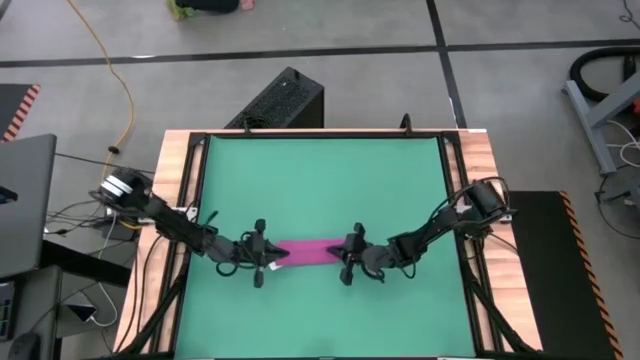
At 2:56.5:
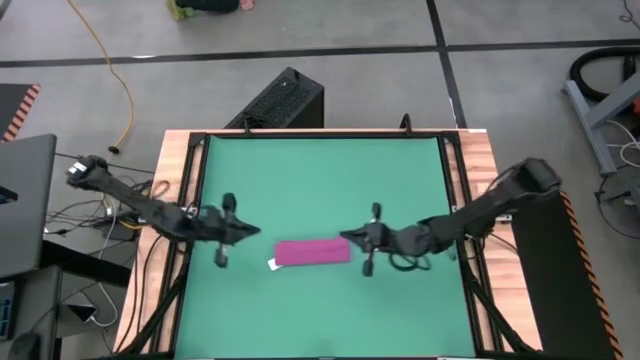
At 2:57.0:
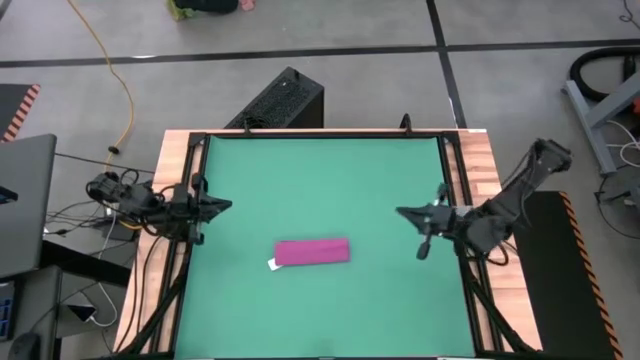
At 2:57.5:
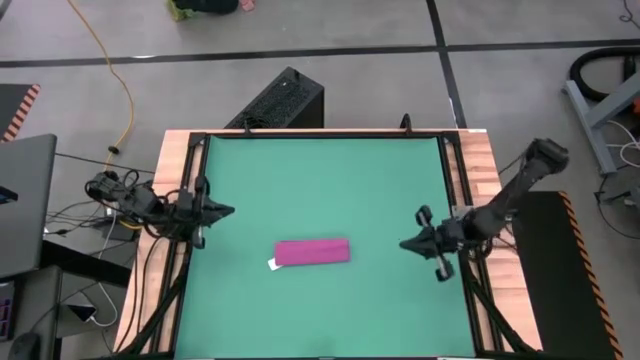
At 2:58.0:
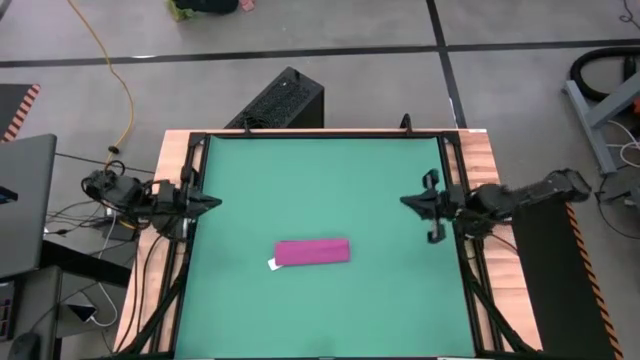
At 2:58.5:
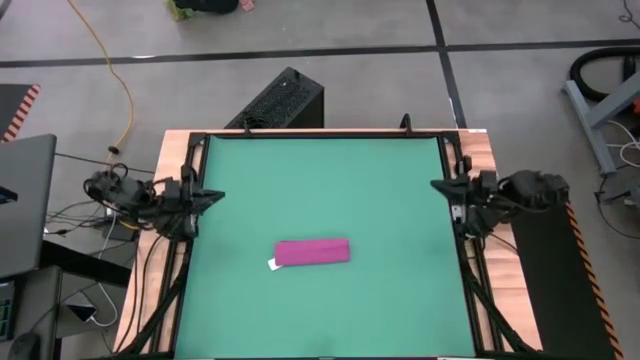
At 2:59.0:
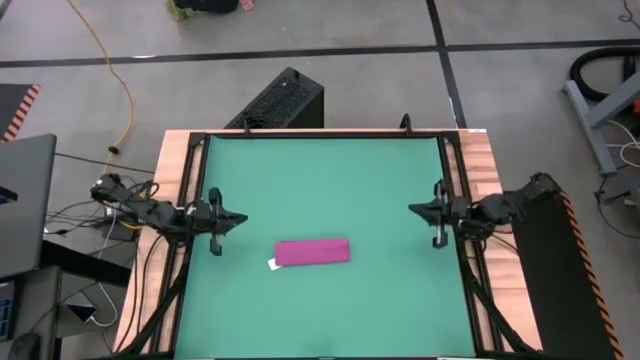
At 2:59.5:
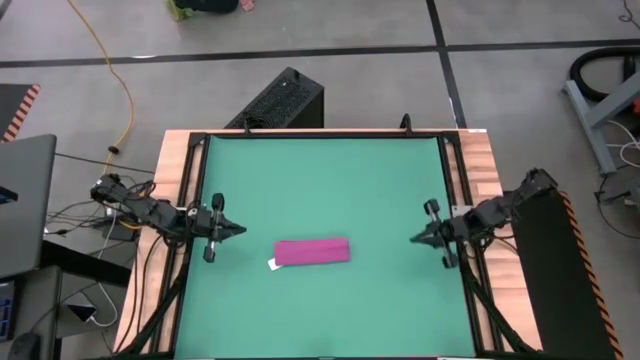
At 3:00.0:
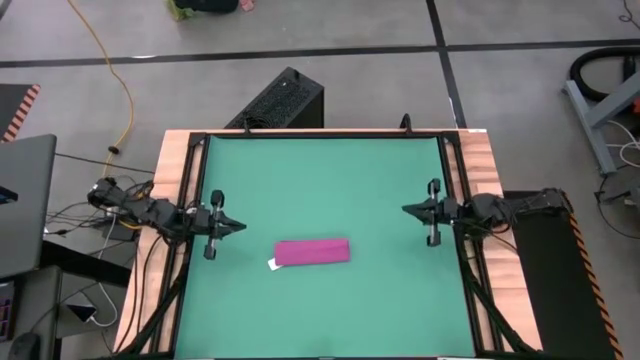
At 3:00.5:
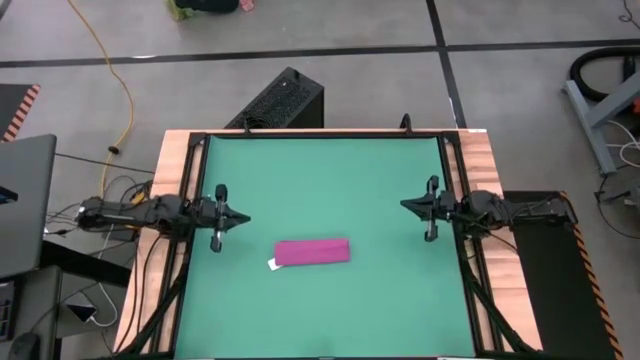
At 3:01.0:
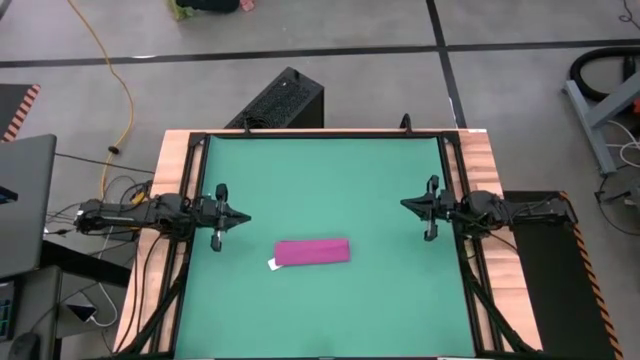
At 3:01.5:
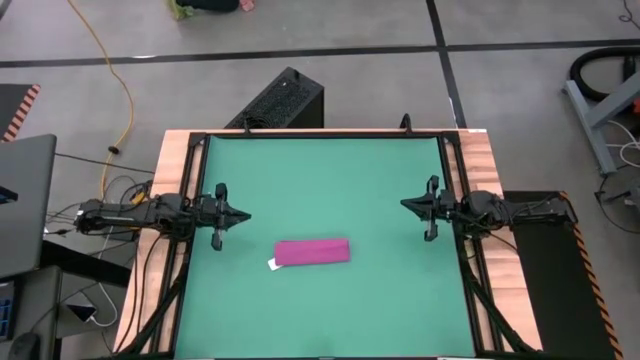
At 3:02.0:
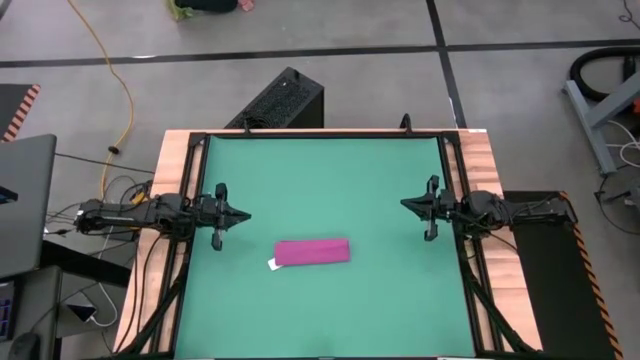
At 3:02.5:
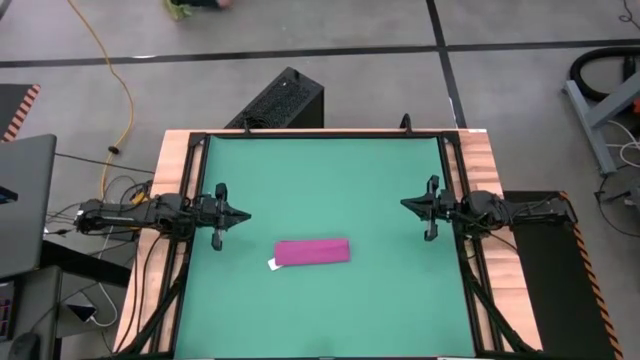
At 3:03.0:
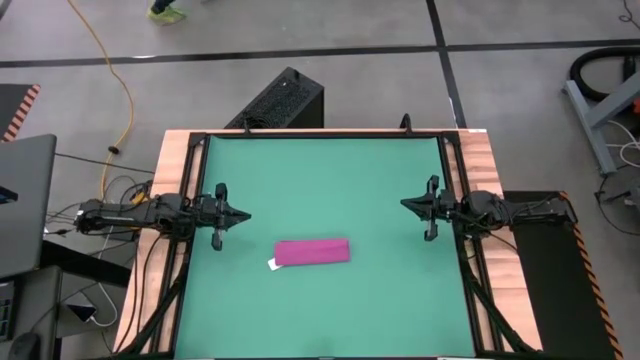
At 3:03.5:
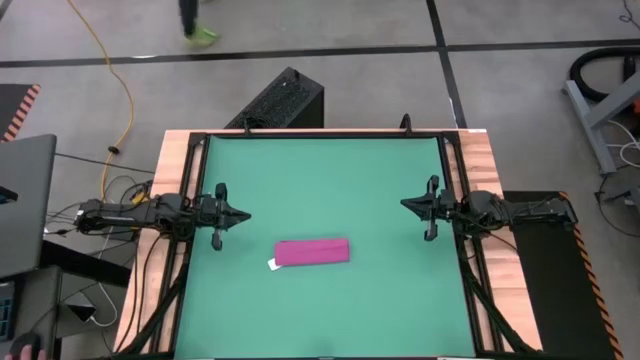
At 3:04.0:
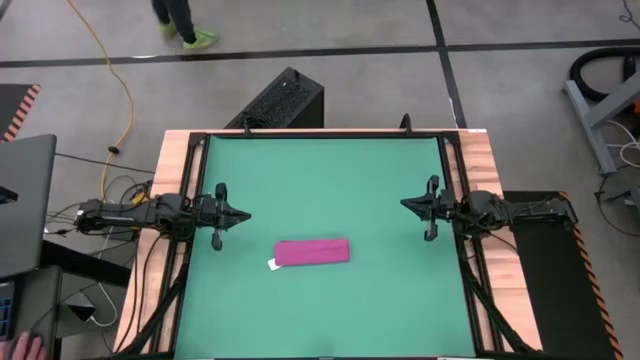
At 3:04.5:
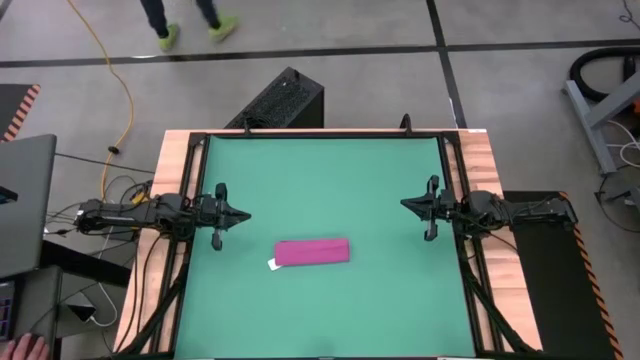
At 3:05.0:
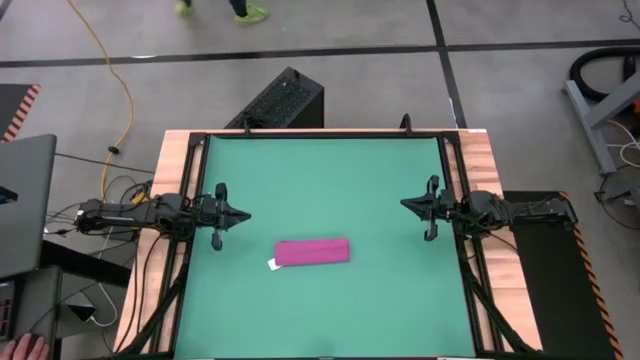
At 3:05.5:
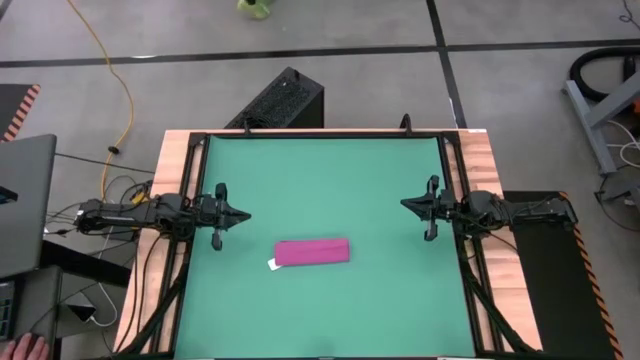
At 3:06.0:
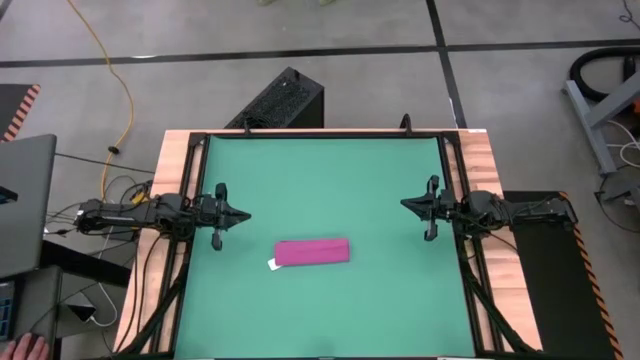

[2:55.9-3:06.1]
Task: Roll towel into tight, uniform cylinder
Return to Home Position

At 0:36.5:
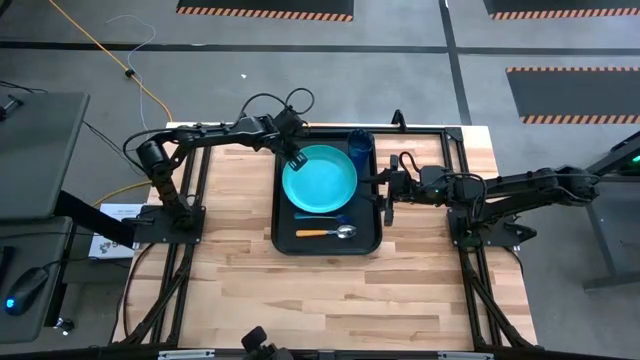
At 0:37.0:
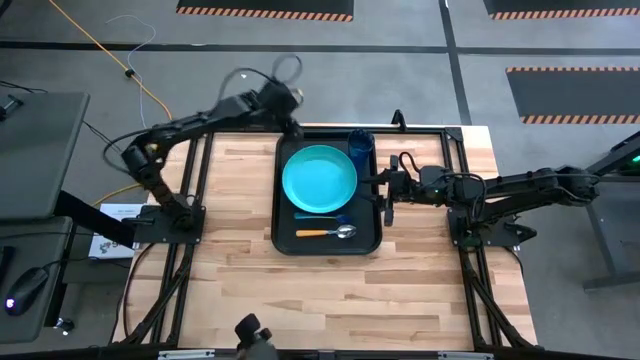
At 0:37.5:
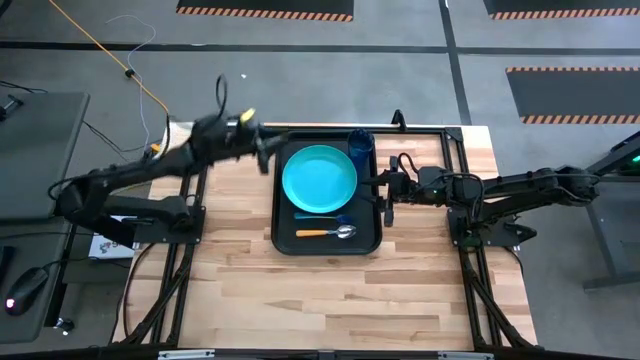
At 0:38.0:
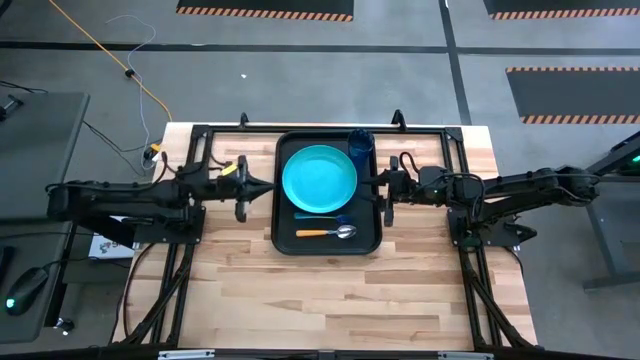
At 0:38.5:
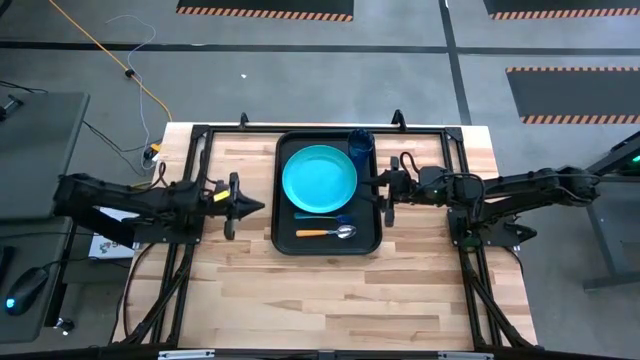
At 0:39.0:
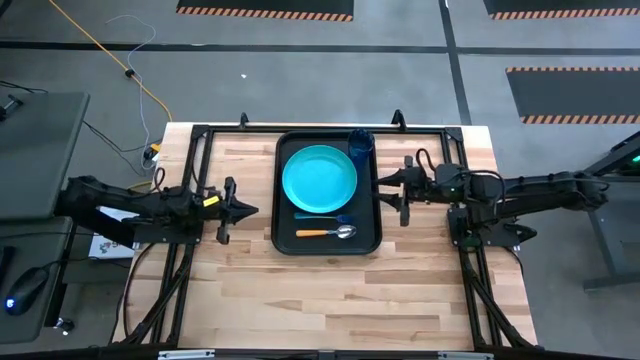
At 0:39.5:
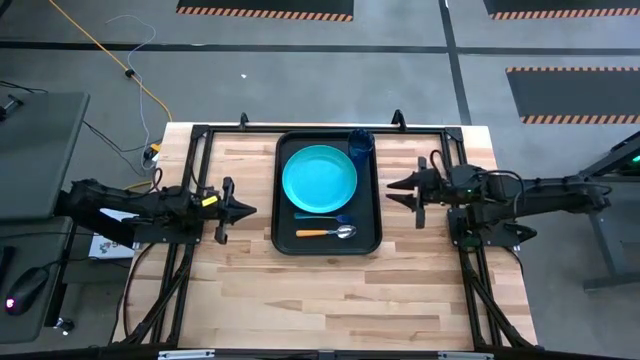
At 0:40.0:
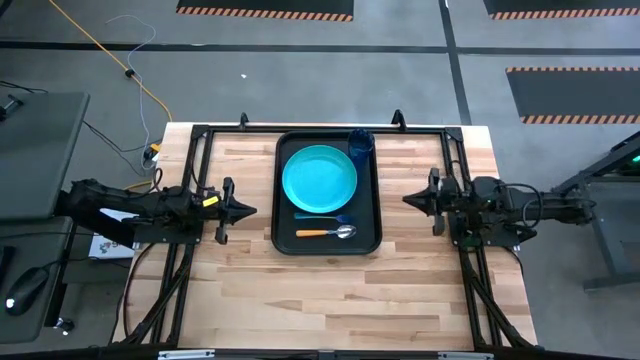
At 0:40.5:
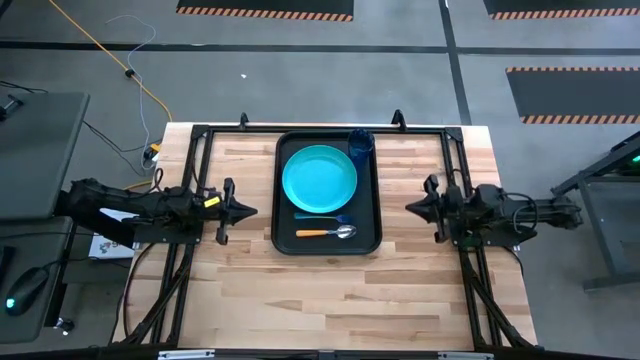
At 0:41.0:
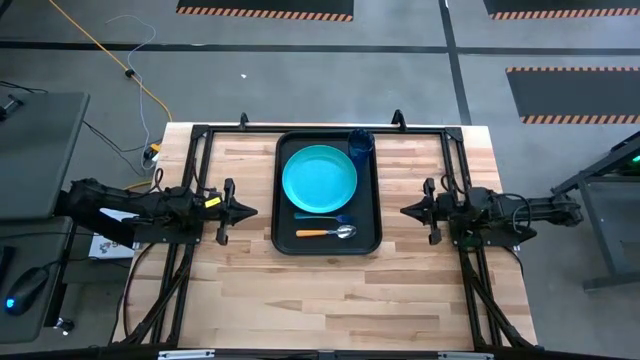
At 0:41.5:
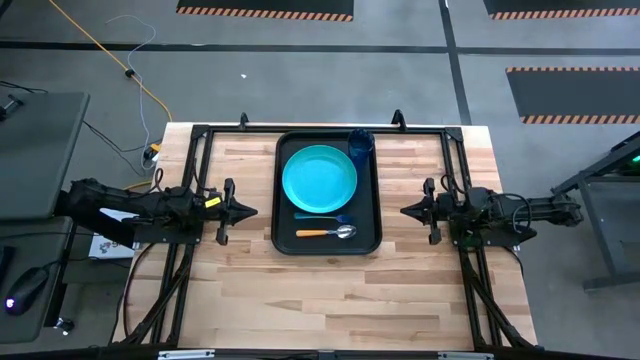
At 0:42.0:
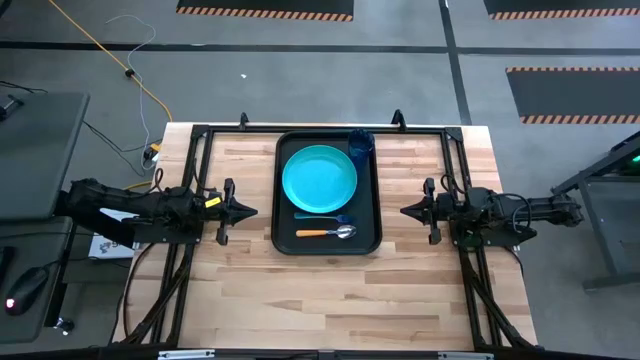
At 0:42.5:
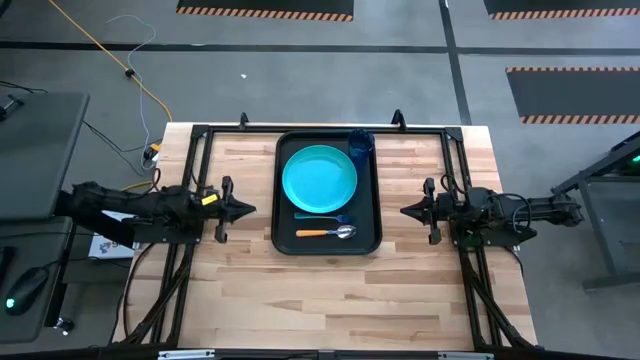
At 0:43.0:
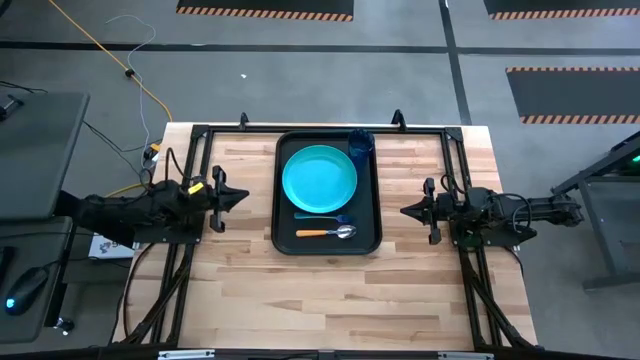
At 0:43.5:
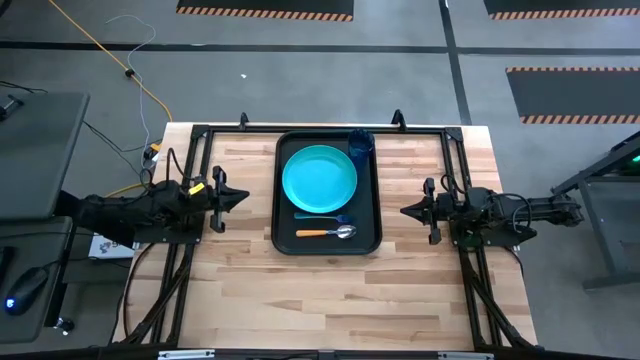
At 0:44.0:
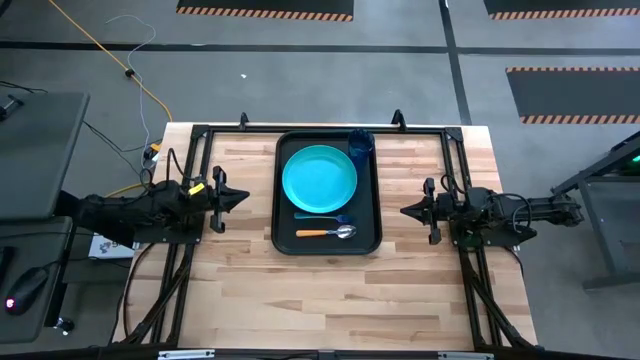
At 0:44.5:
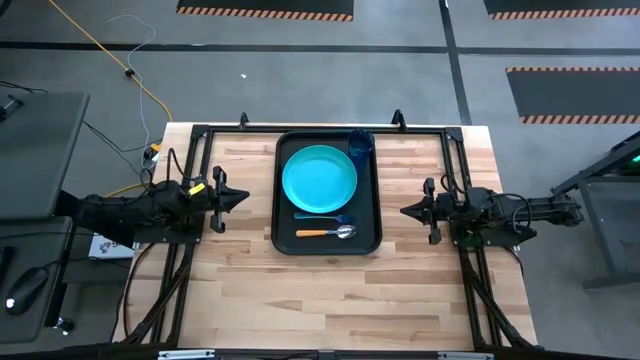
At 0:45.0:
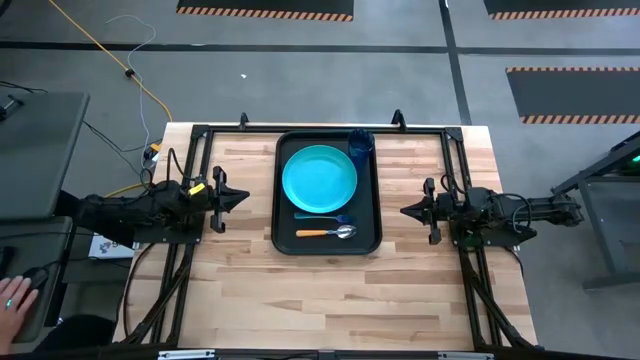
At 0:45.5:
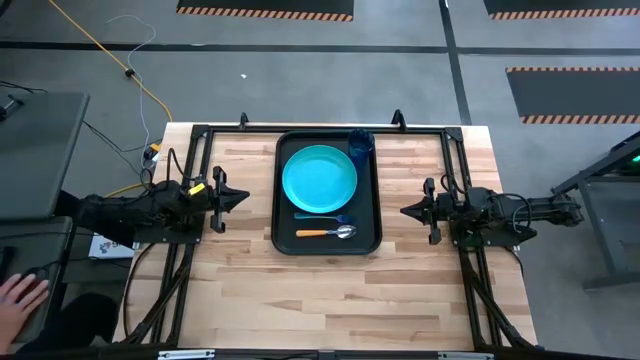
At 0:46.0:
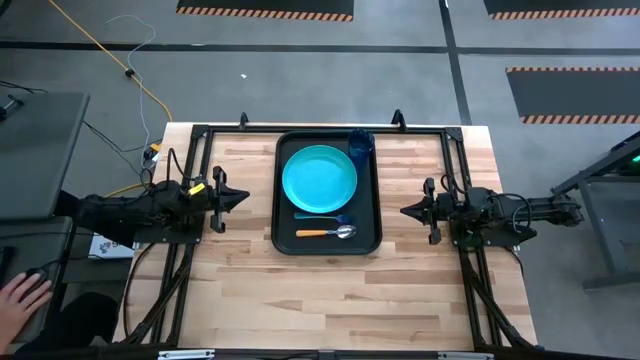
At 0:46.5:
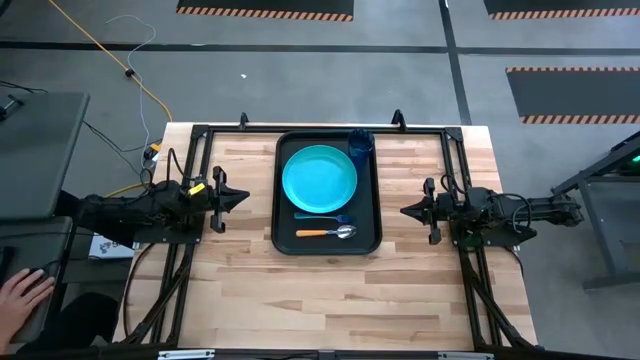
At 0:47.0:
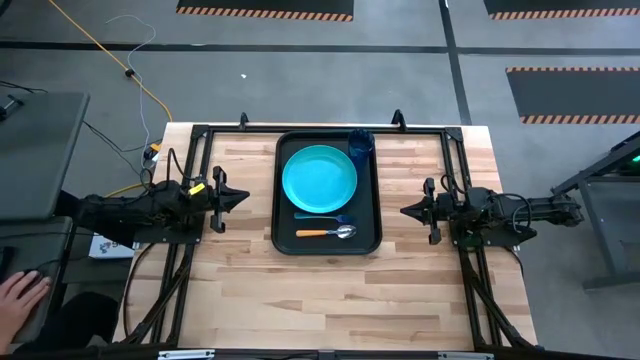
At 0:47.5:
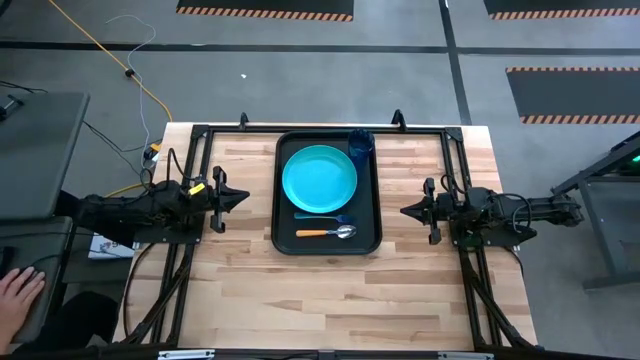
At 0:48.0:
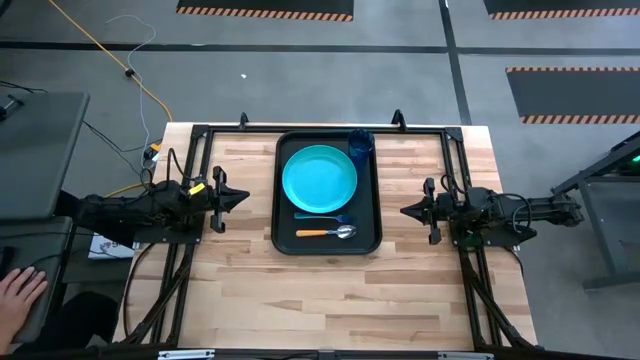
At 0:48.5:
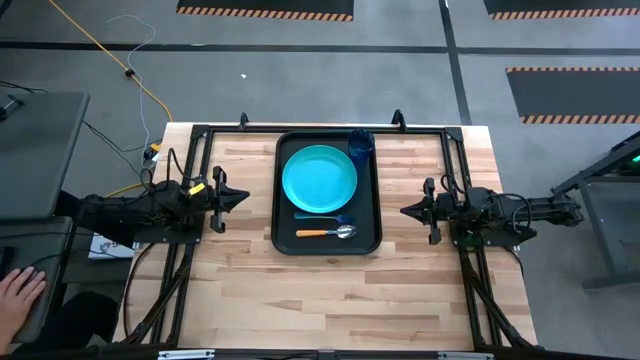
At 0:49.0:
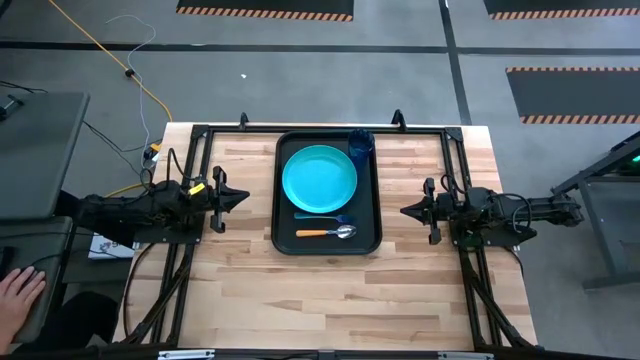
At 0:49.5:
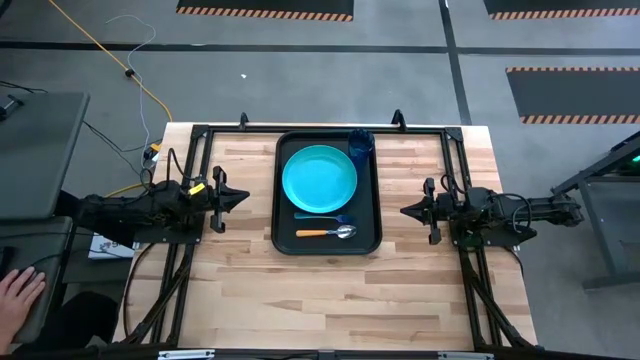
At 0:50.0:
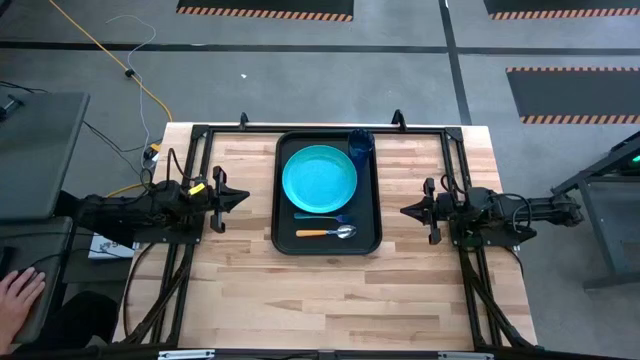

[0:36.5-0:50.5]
Task: Pick and place plate/cup/fork/spoon on tray
Return to Home Position
